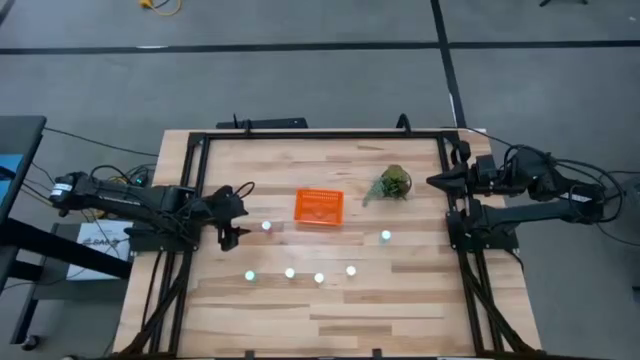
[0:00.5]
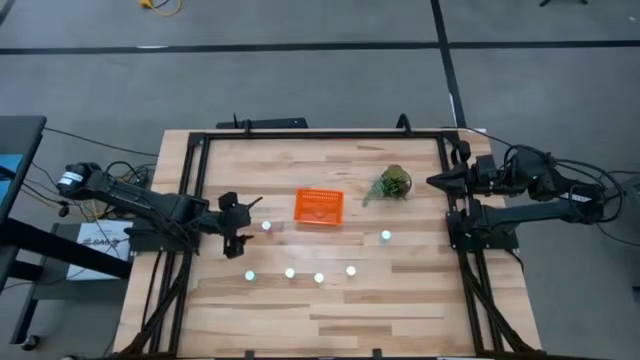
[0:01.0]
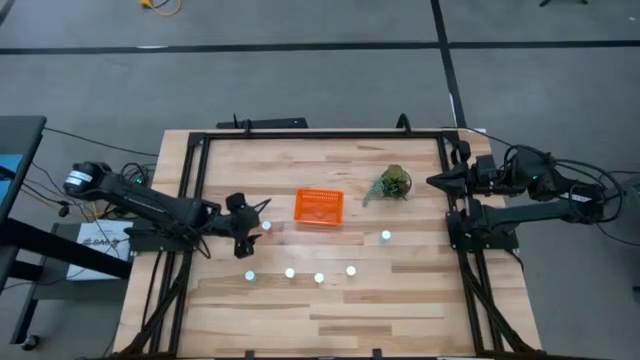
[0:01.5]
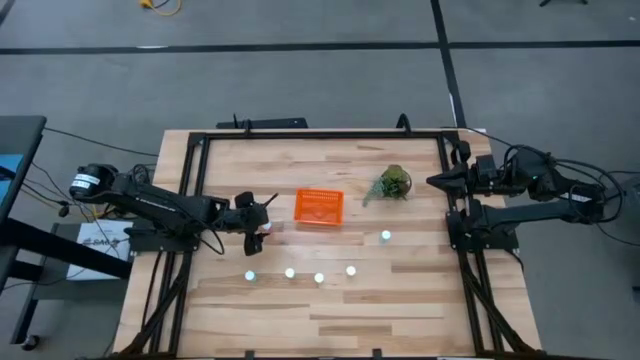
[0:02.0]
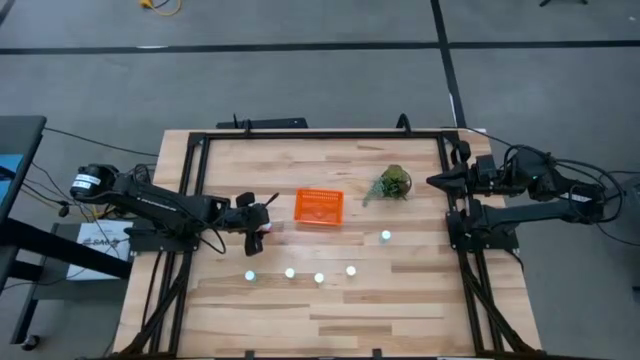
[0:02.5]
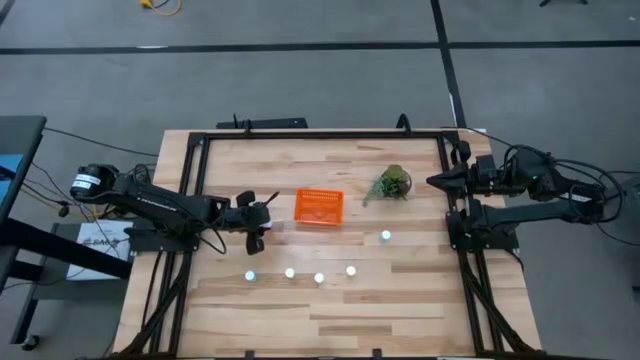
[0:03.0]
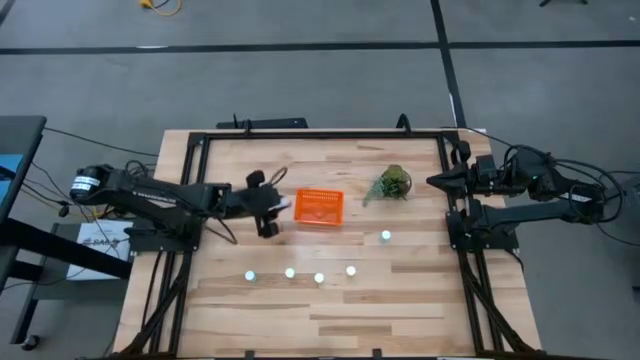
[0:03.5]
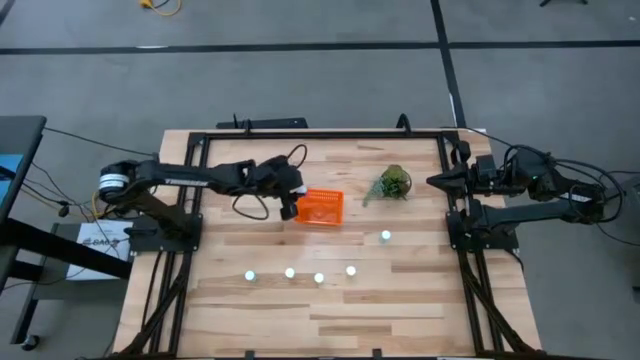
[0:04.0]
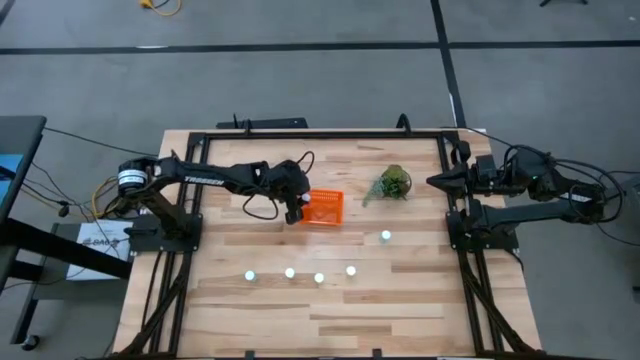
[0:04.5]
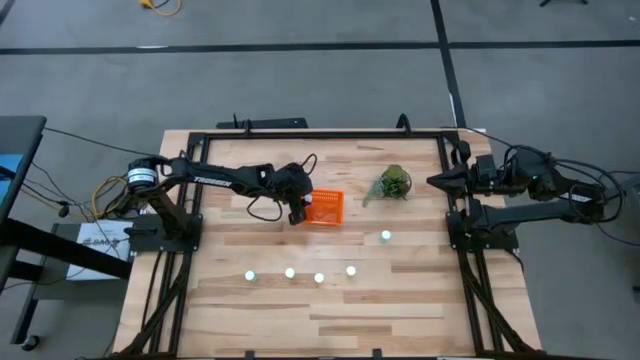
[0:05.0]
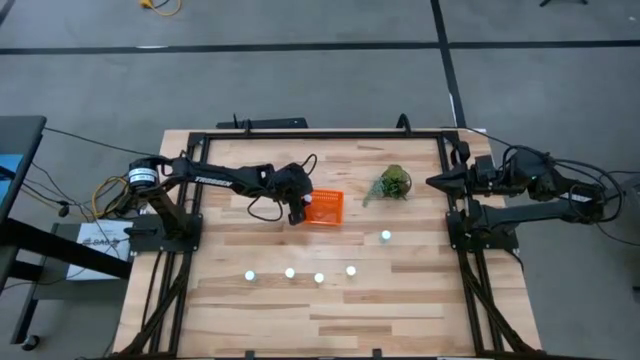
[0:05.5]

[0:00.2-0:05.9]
Task: Pick and place pill bottles into a basket
Put the purple pill bottle into the orange bin

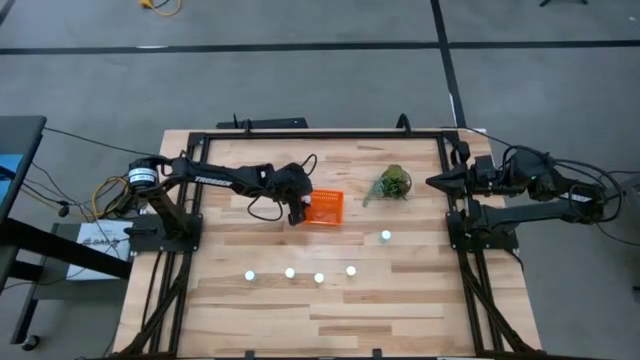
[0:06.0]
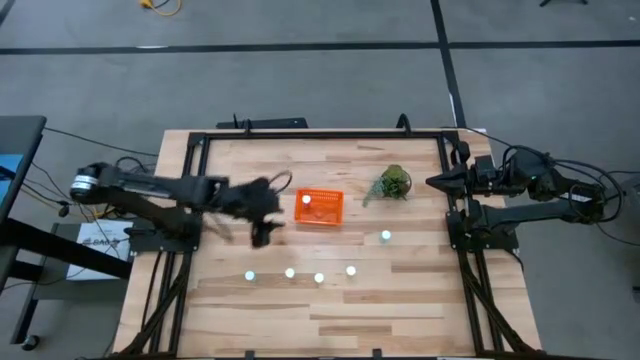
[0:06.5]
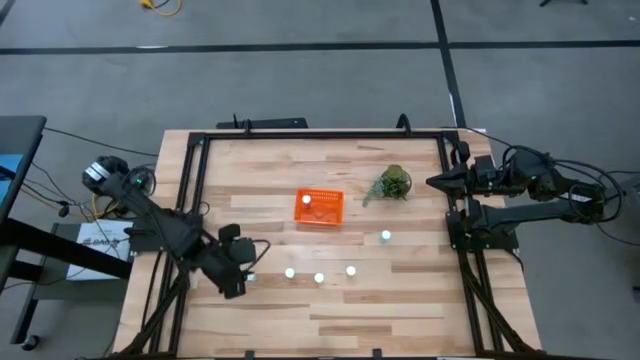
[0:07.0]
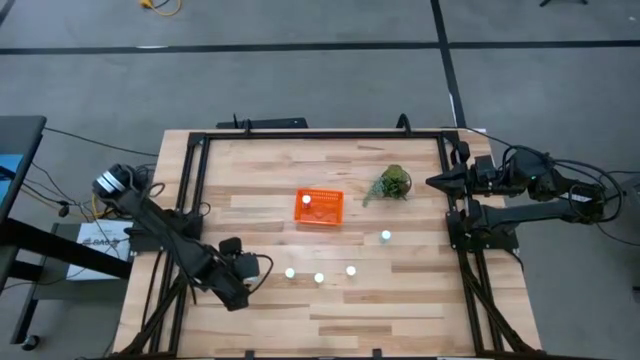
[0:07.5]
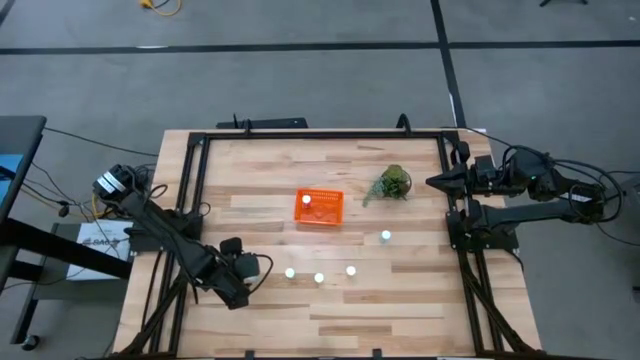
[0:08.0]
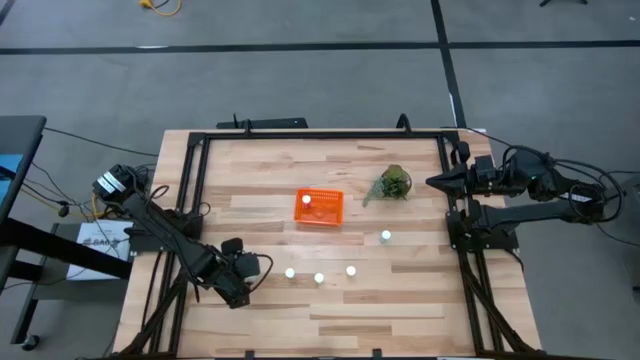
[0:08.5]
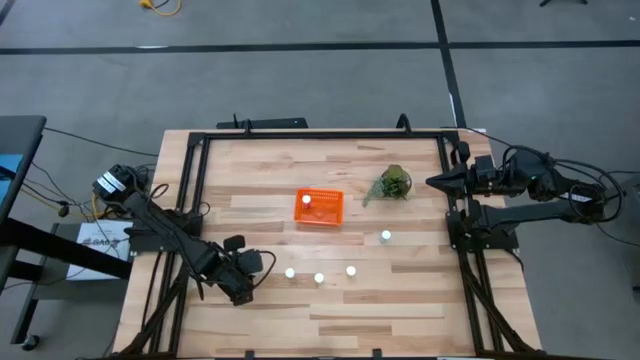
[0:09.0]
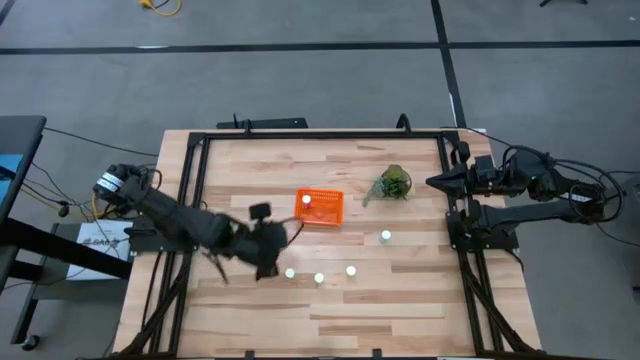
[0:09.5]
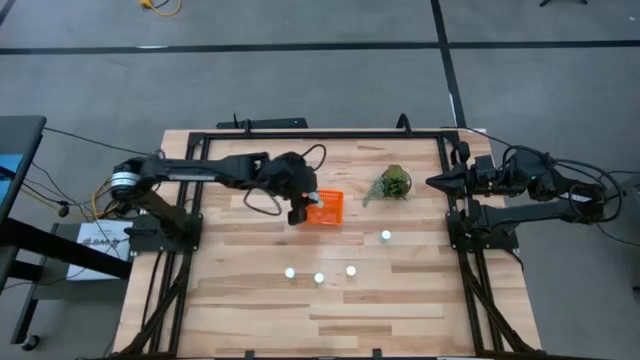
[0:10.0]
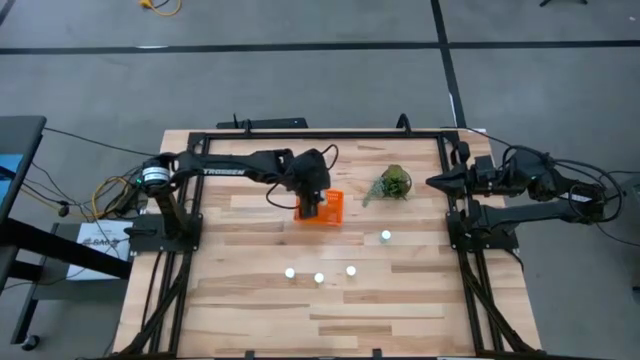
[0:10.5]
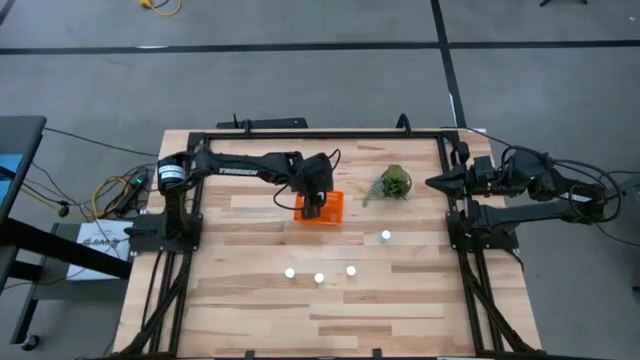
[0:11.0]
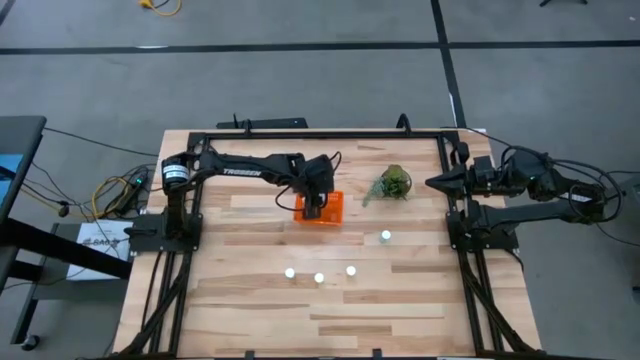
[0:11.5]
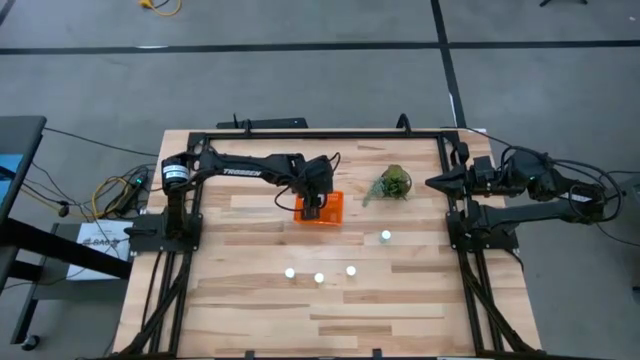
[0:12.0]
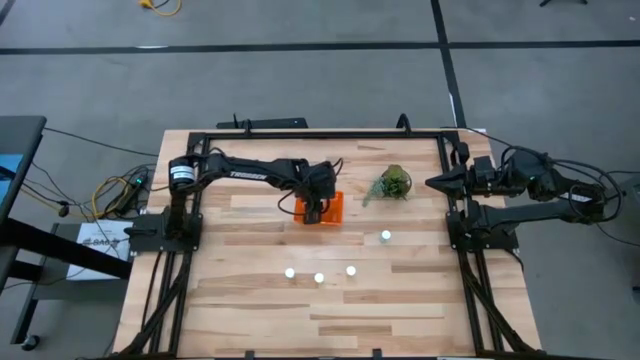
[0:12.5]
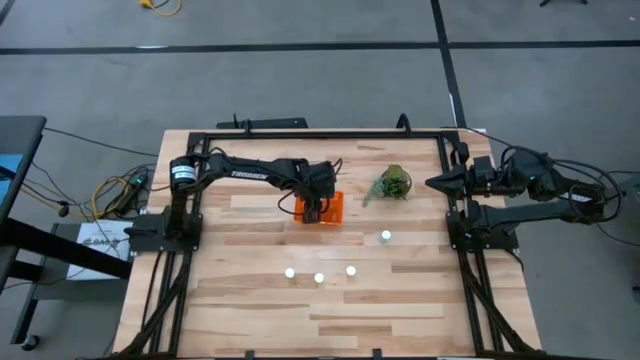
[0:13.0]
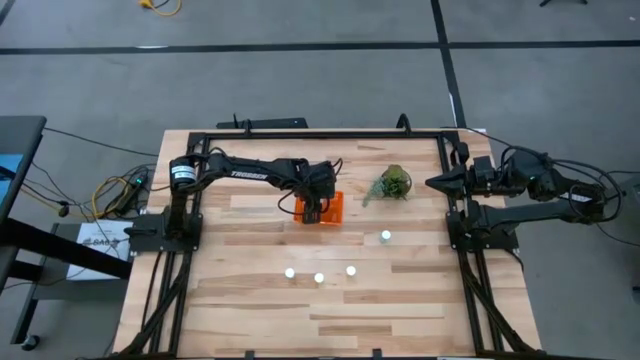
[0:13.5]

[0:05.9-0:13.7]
Put the left blue pill bottle into the orange bin

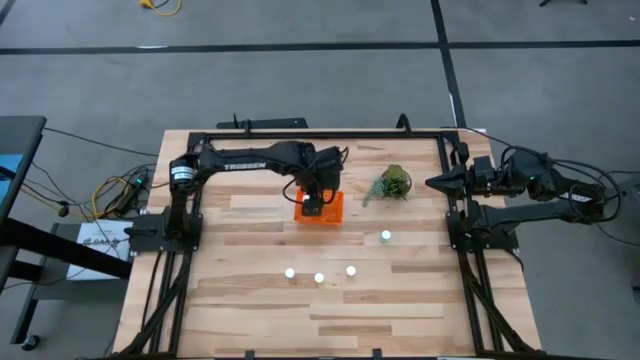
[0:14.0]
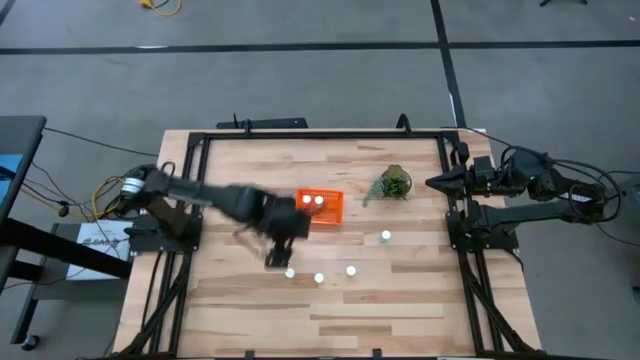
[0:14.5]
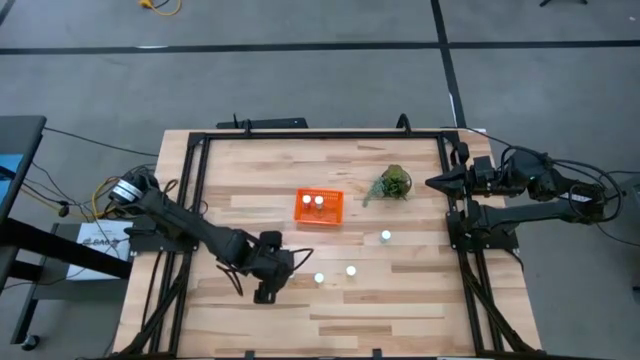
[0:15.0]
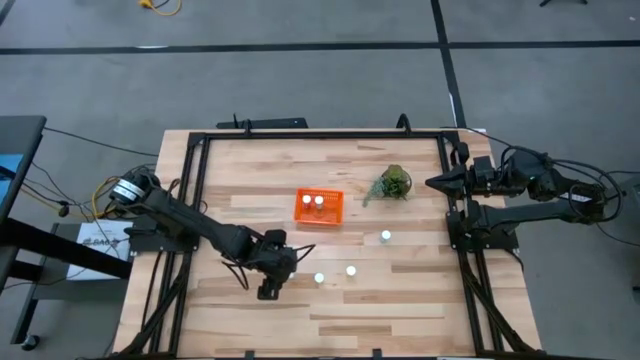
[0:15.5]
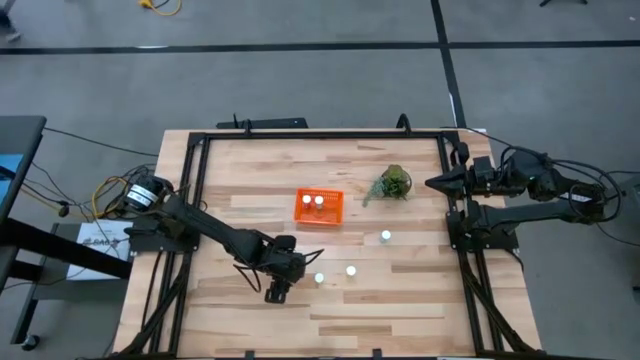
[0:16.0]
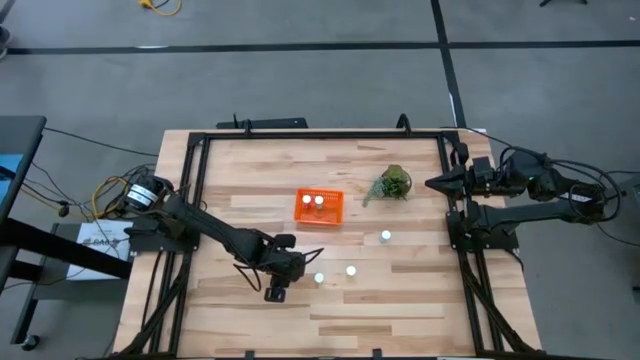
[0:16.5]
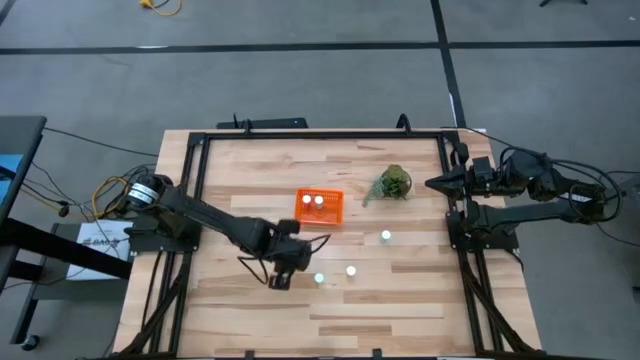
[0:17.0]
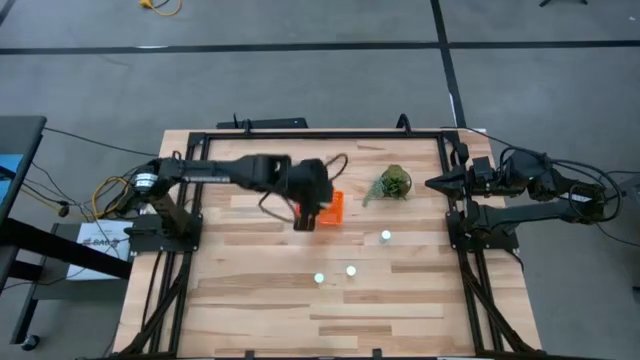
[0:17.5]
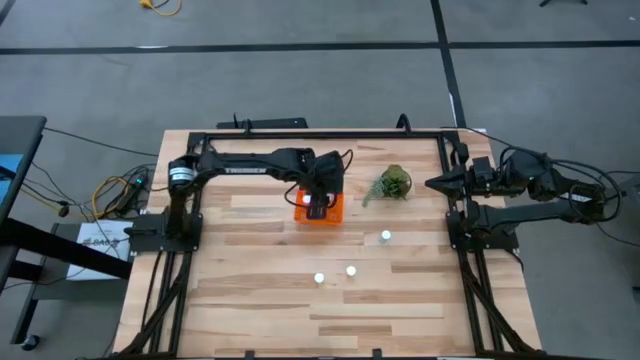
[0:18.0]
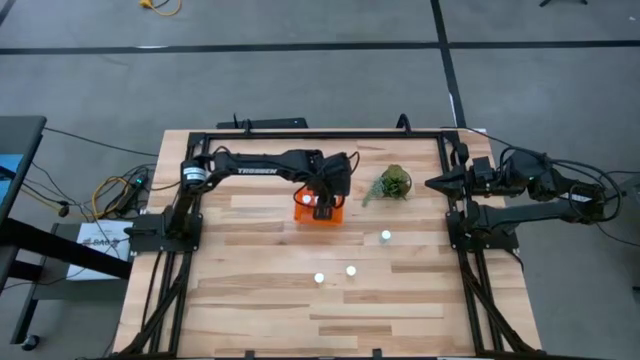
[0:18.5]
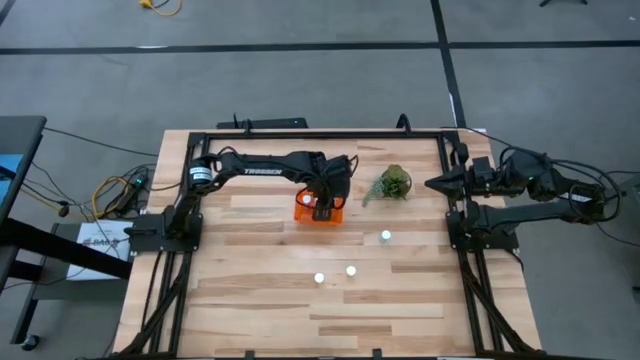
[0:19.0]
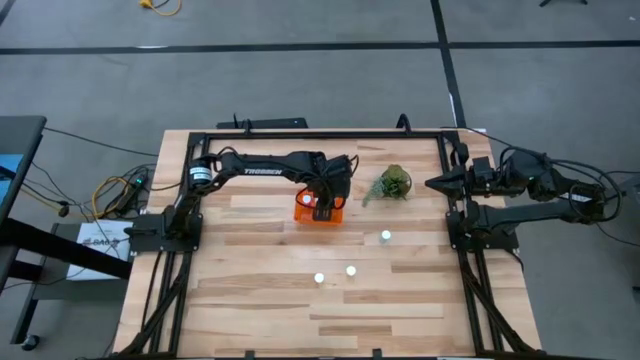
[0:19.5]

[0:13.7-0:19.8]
Put the left yellow pill bottle into the orange bin

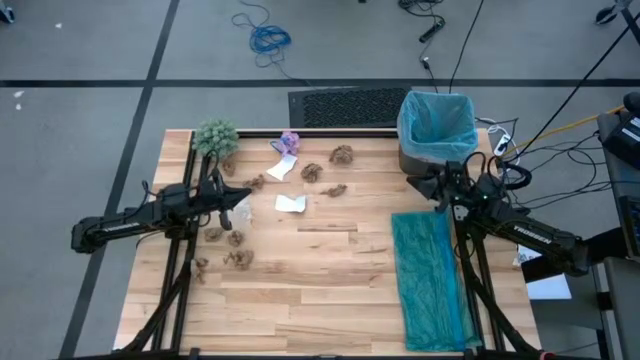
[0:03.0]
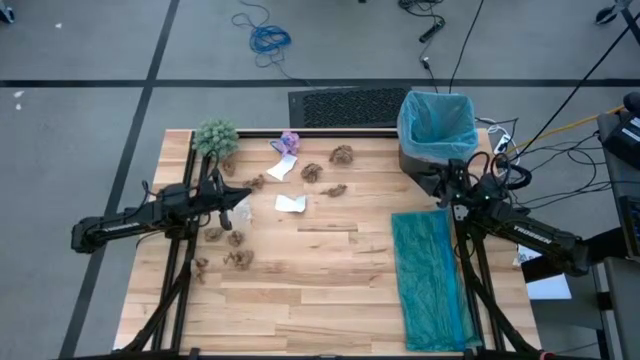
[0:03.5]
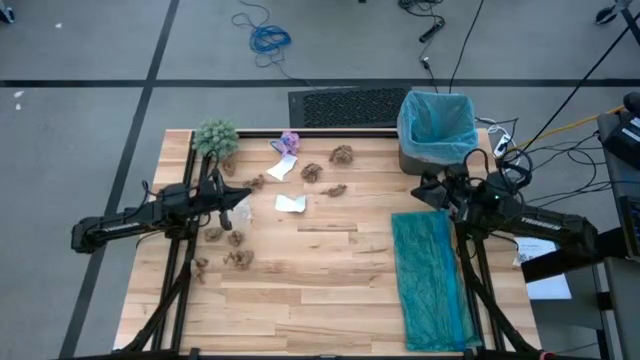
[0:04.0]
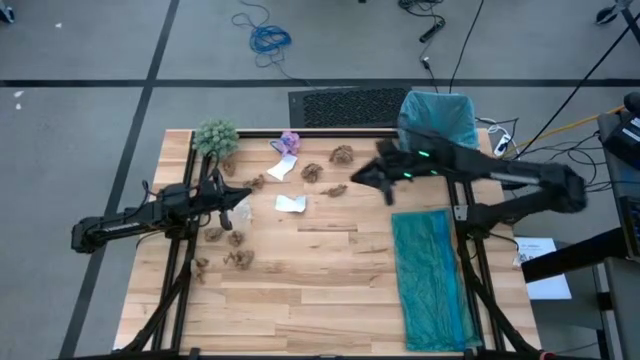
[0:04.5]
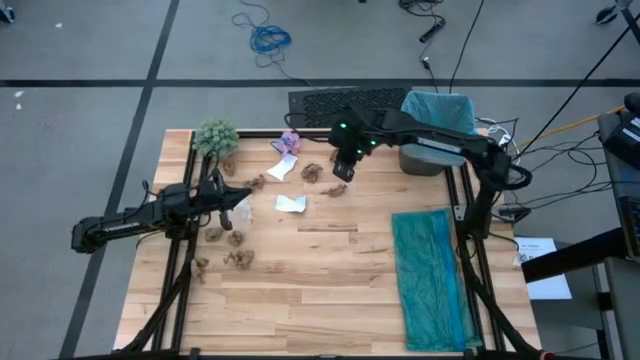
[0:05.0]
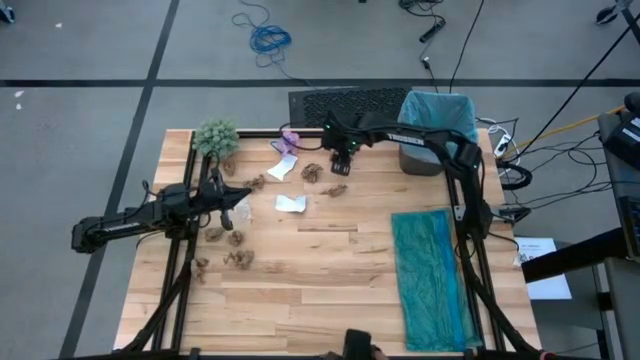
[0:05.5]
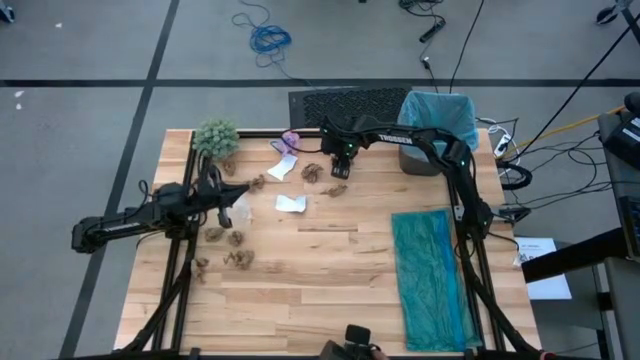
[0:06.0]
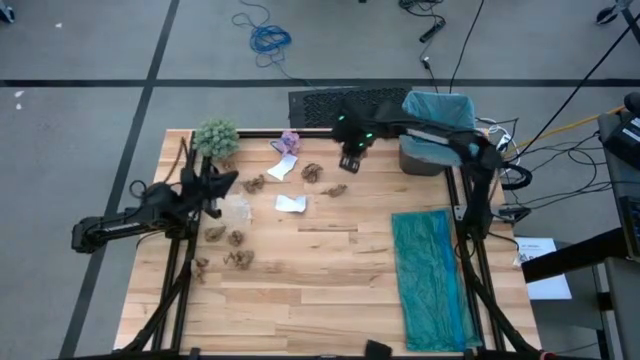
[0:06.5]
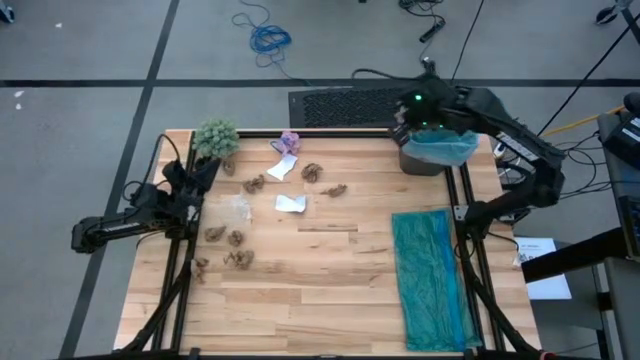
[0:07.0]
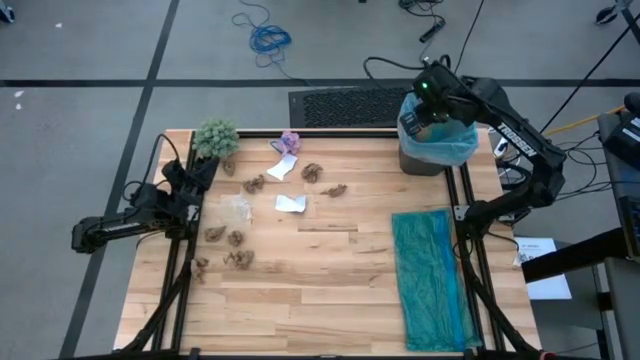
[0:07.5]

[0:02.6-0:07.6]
Task: place trash/remove bag and relplace
Put the brown paper into the trash bin
